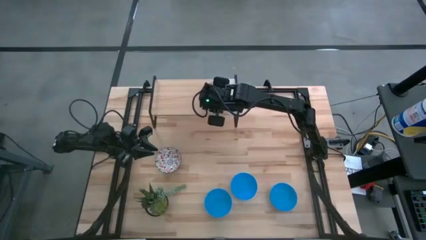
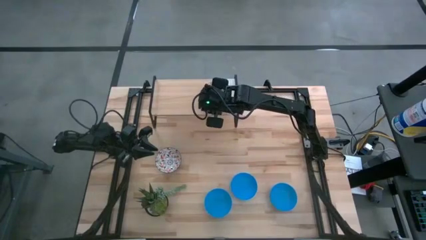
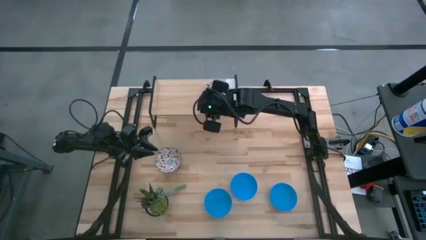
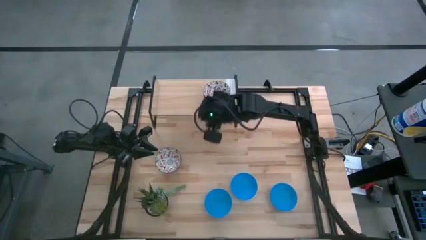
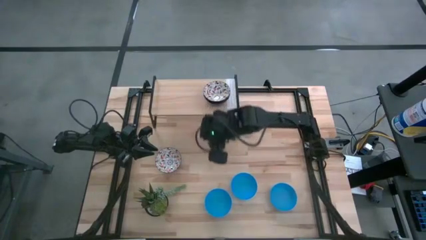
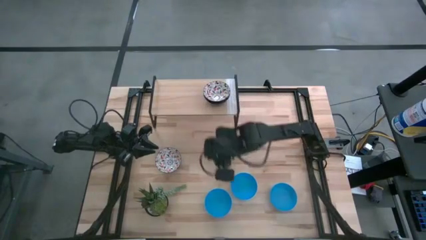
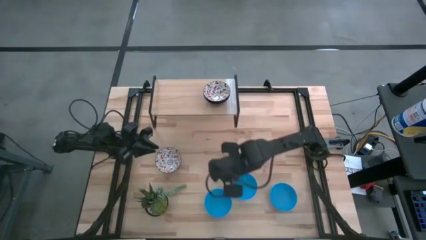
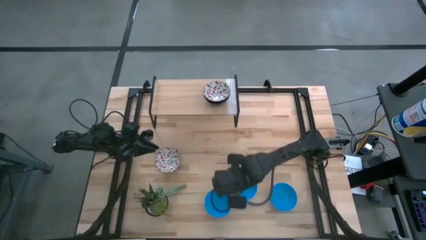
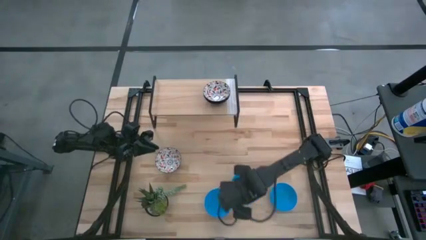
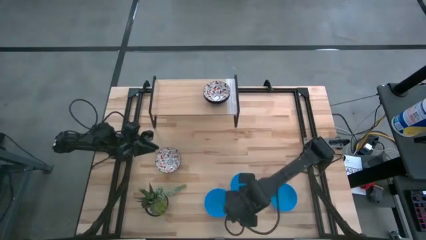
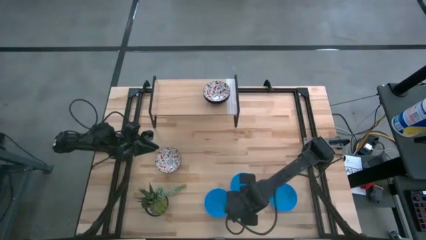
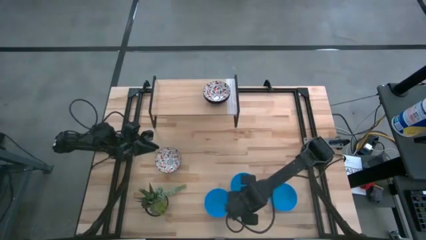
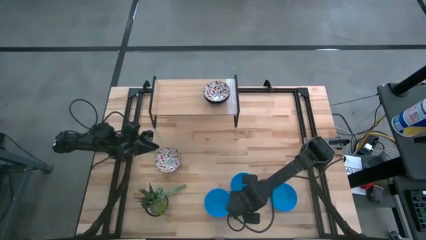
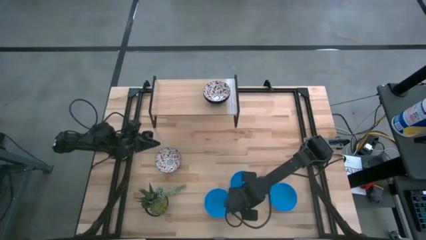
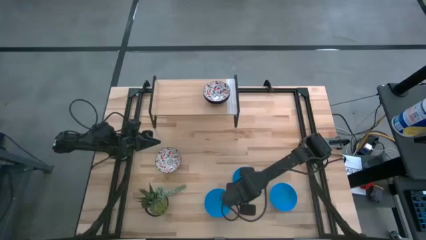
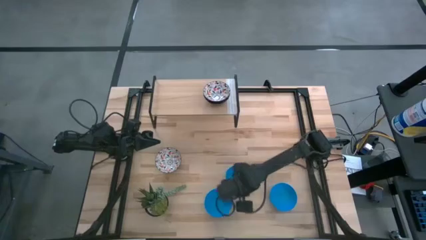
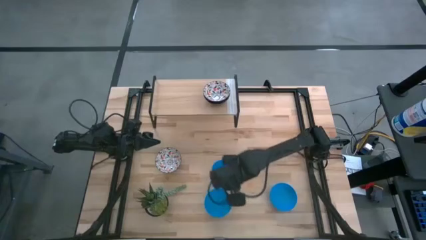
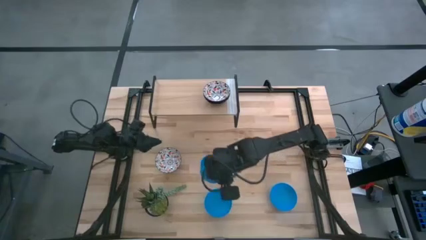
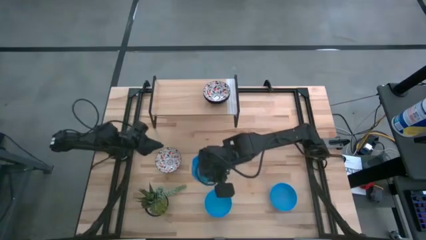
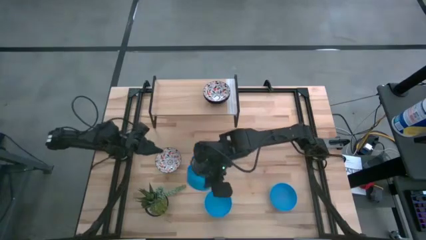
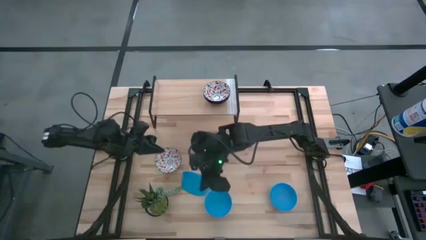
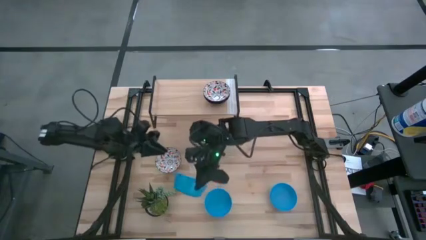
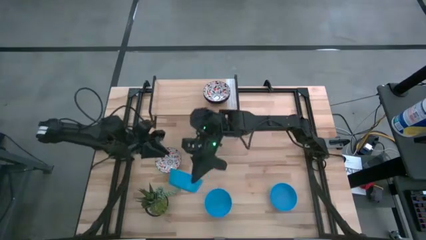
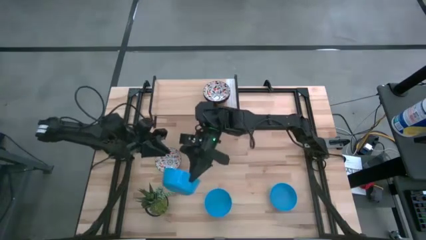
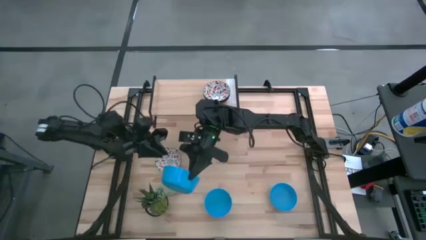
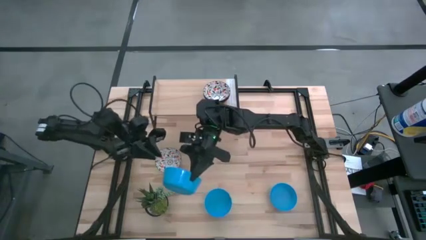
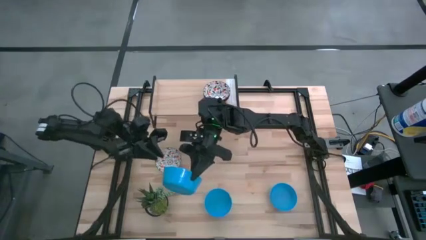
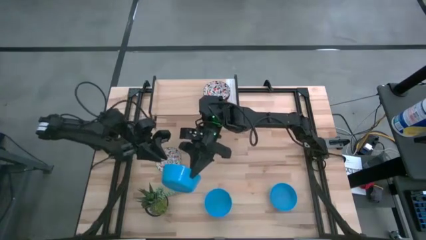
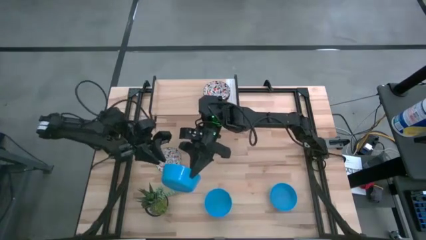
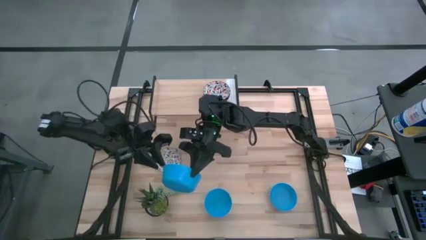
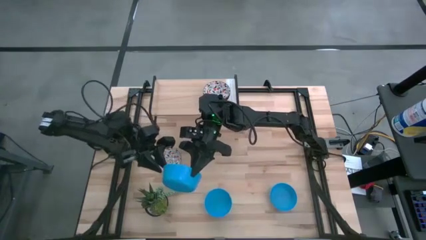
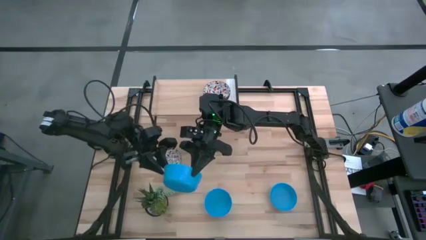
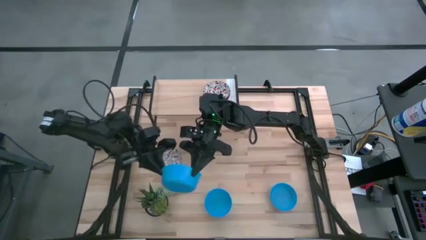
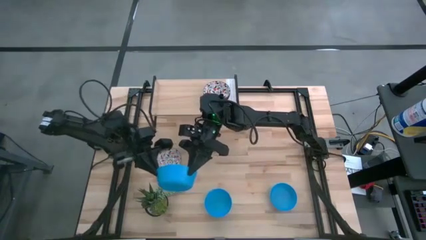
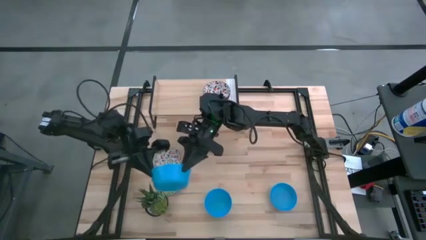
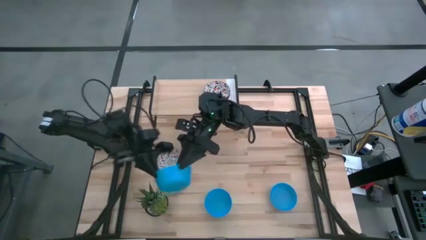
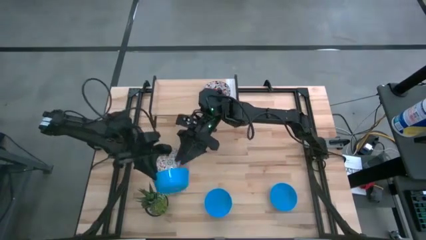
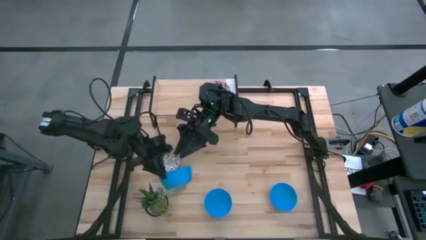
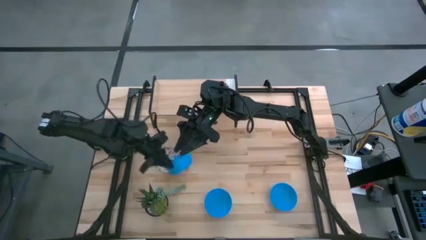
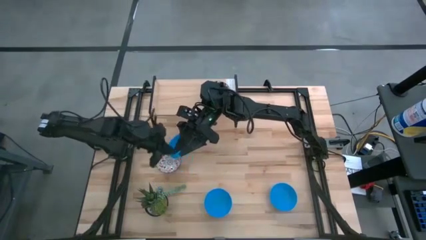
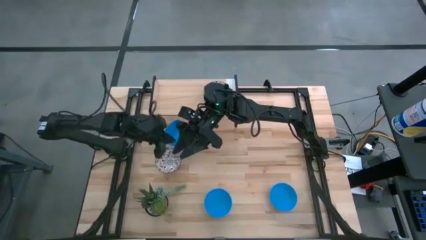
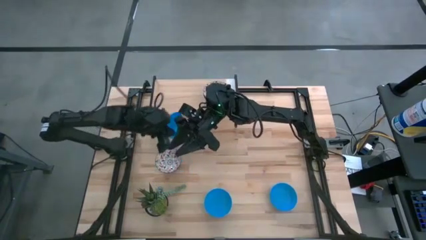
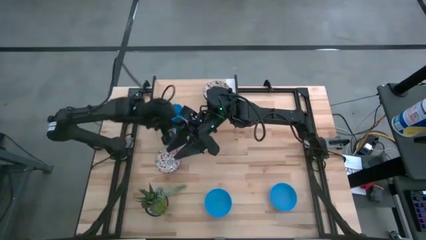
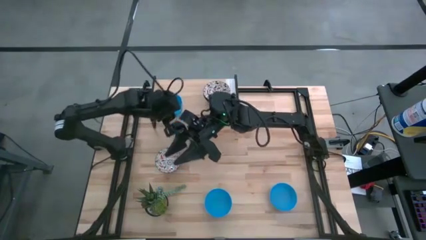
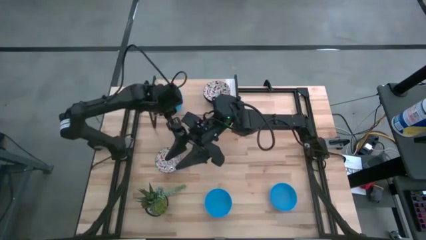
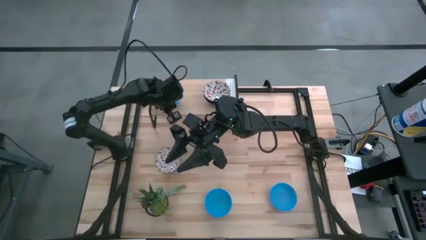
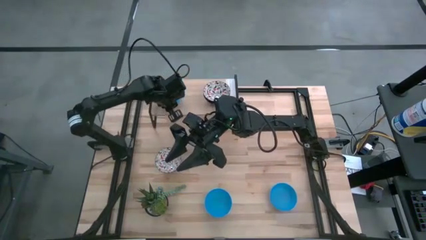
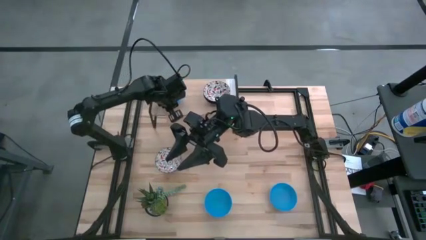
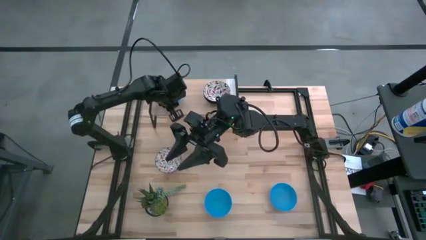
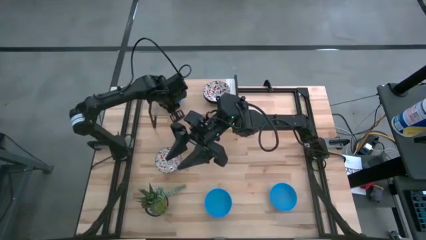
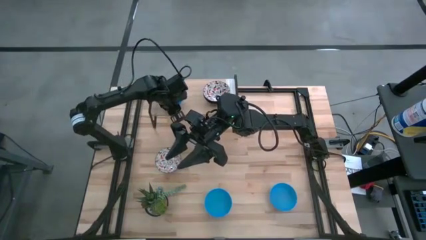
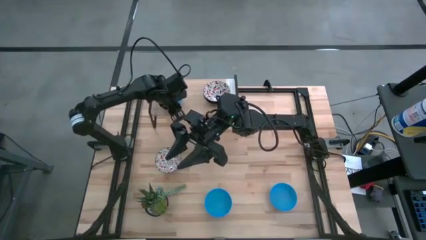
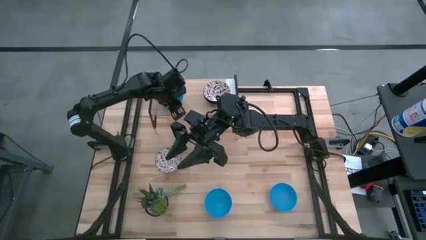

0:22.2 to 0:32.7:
Task: Pick & Place Mini bowls
Put the blue bowl on the shelf

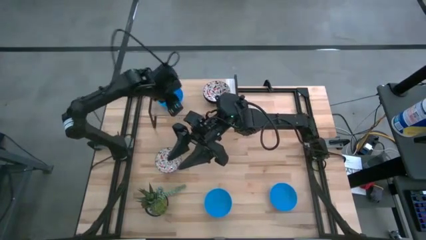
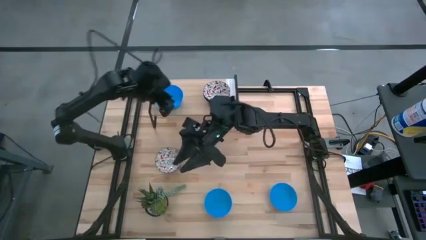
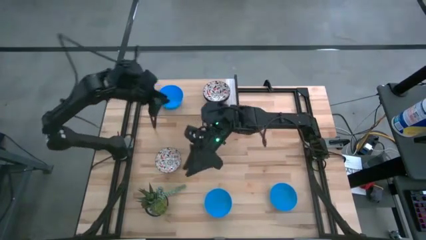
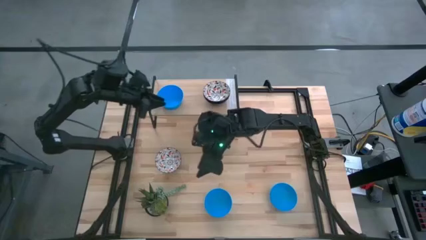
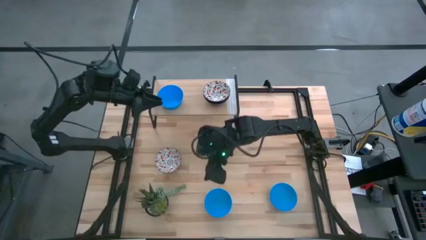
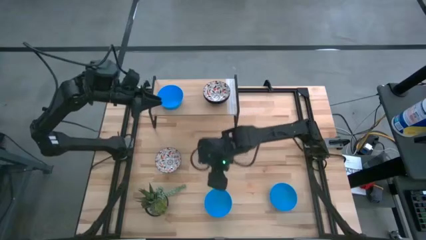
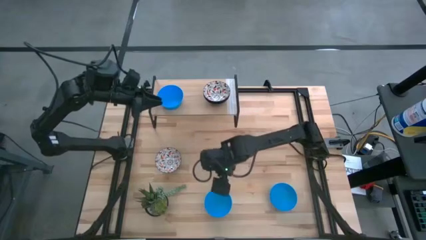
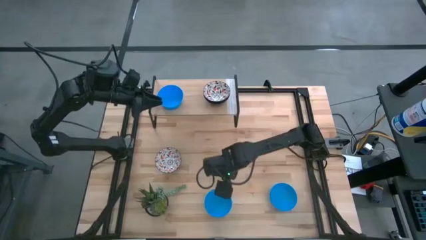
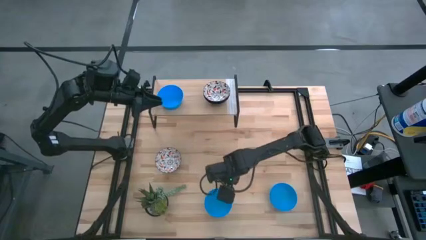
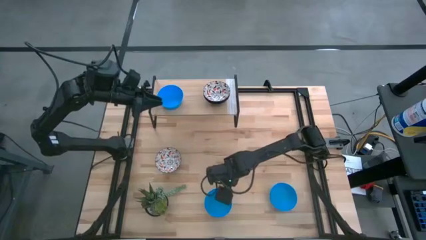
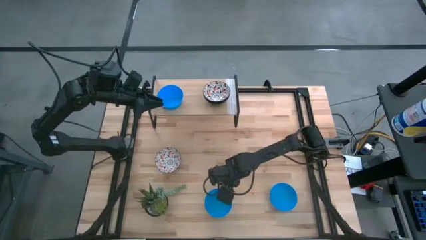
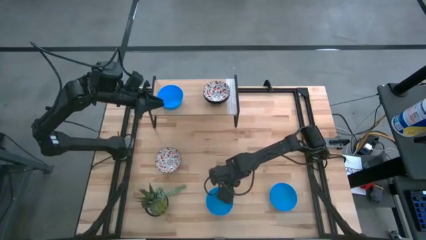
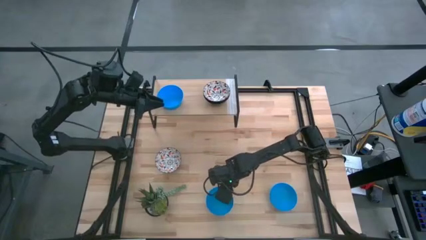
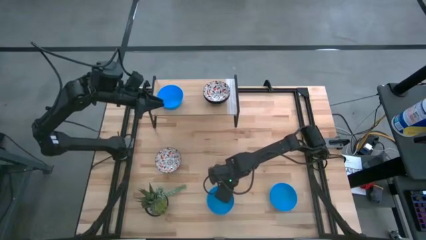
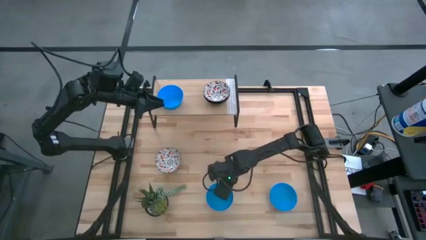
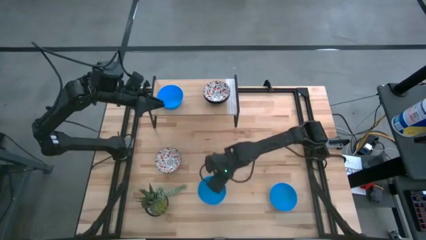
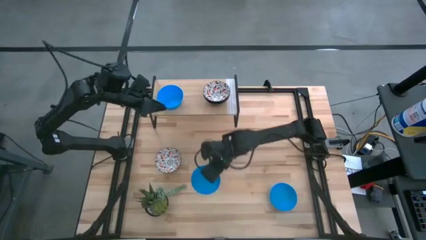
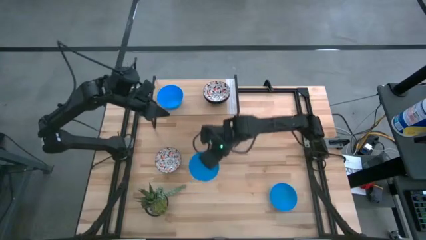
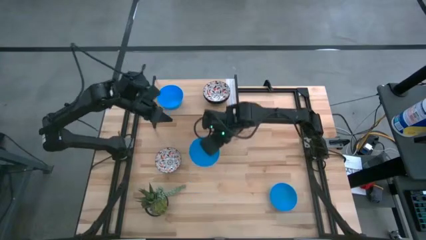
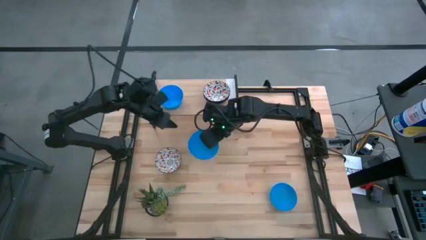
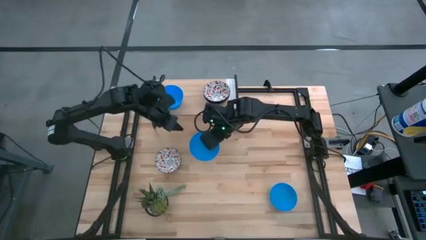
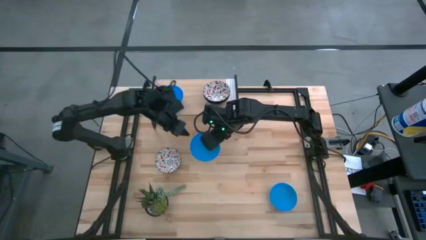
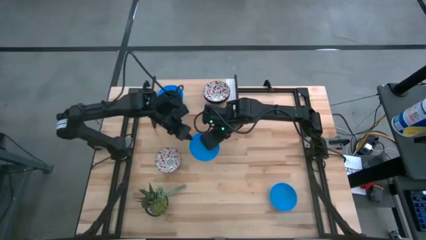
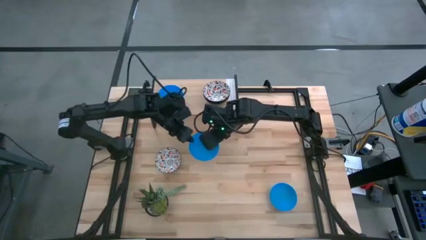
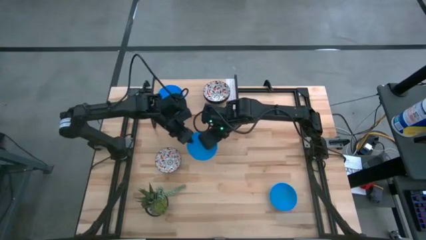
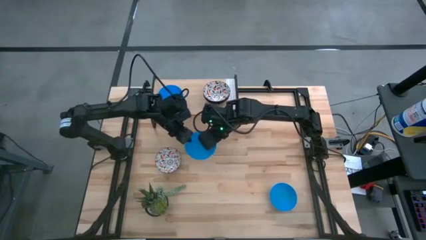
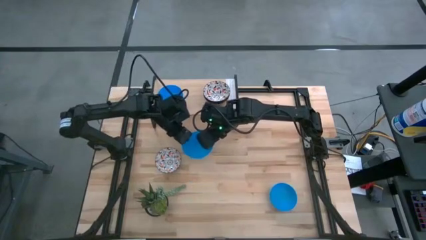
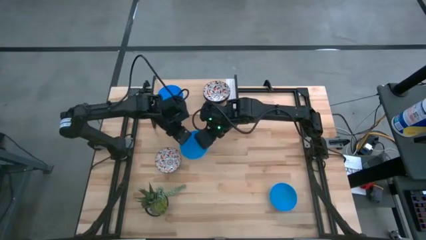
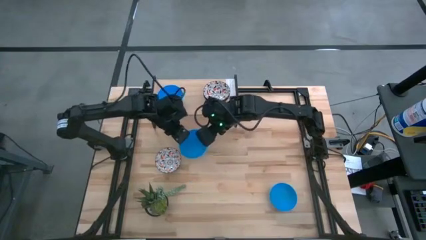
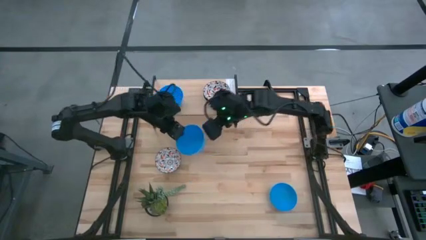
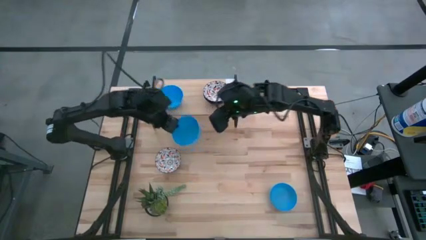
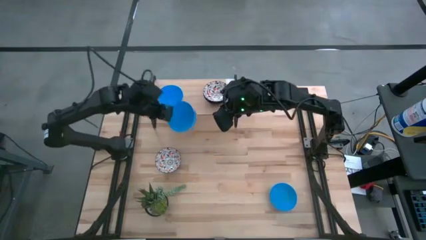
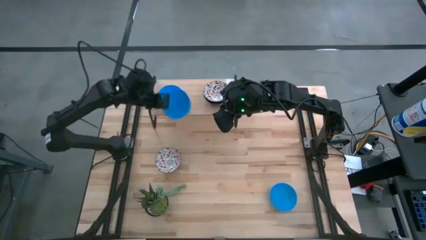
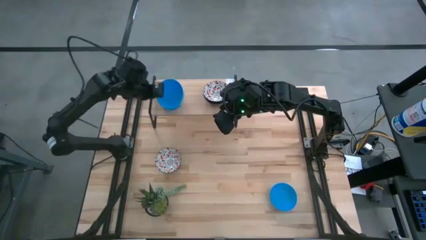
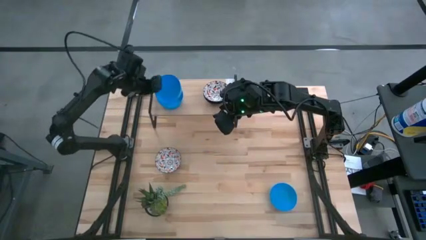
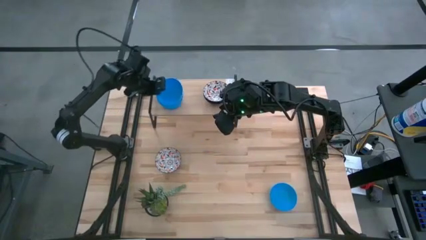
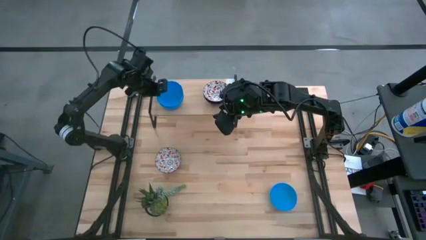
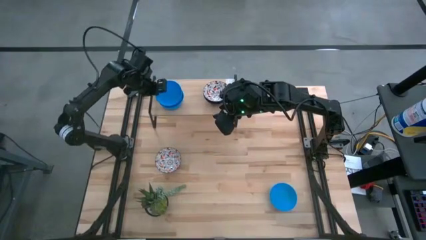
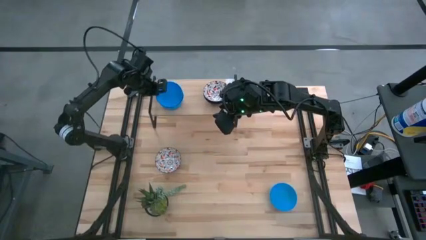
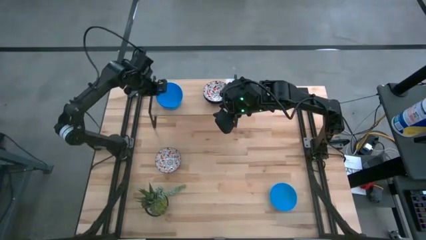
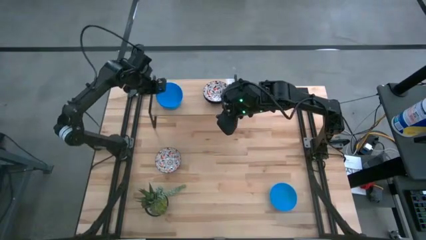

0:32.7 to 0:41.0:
Stack the blue bowl on the blue bowl on the shelf
